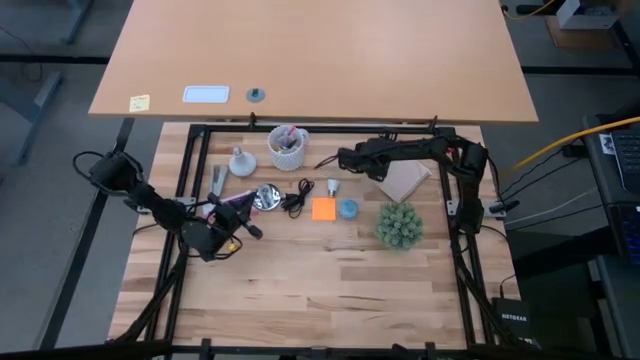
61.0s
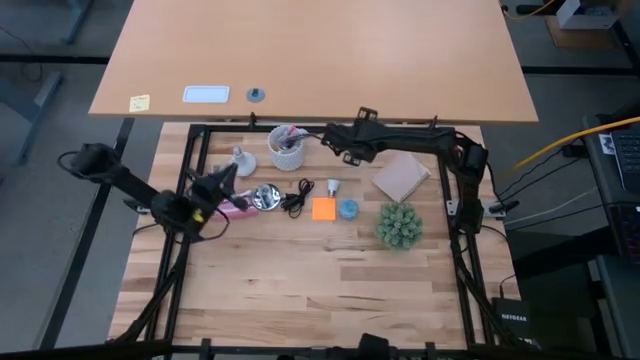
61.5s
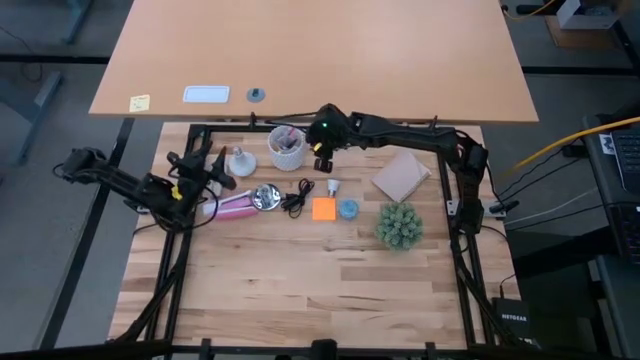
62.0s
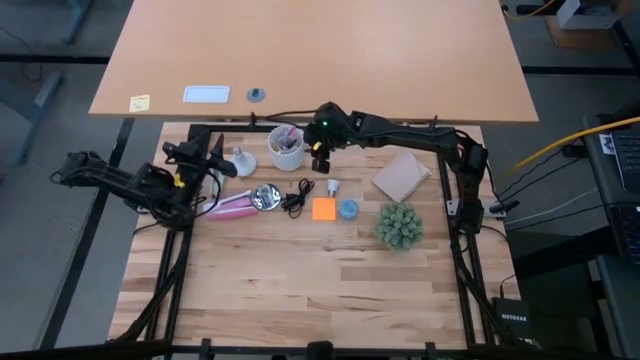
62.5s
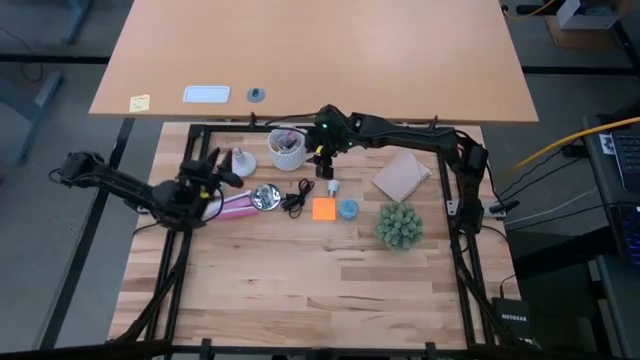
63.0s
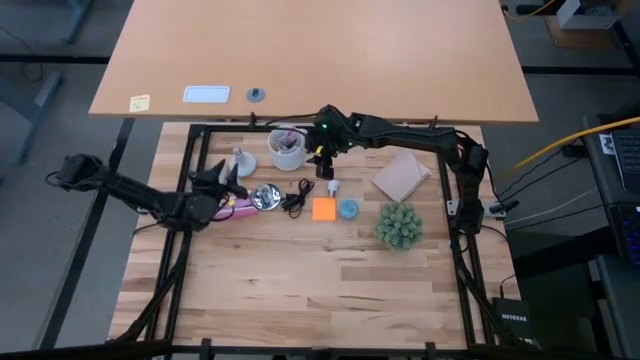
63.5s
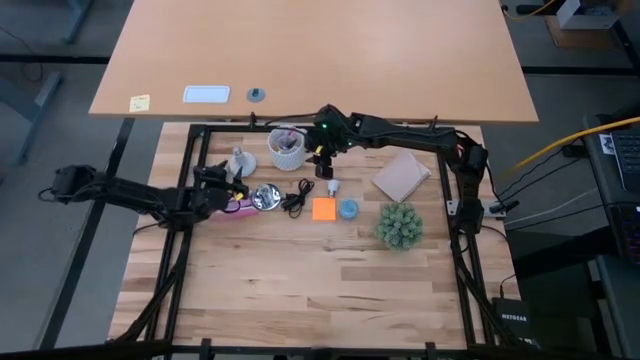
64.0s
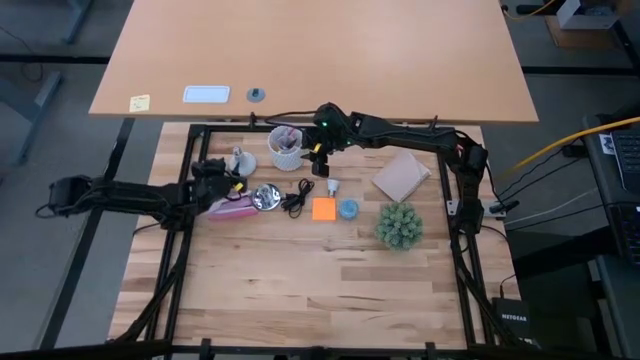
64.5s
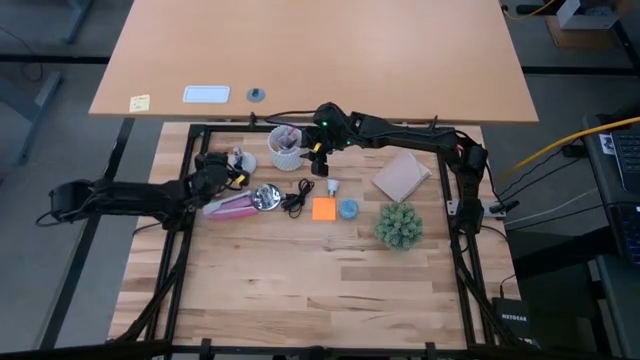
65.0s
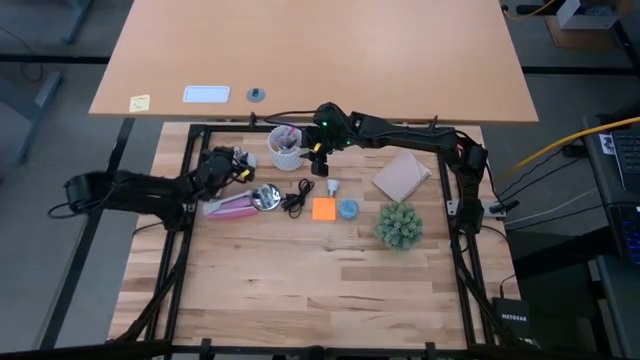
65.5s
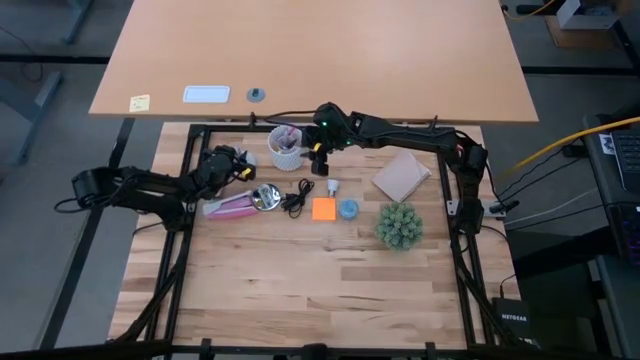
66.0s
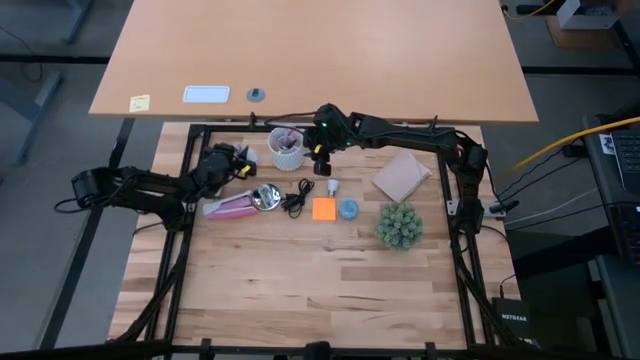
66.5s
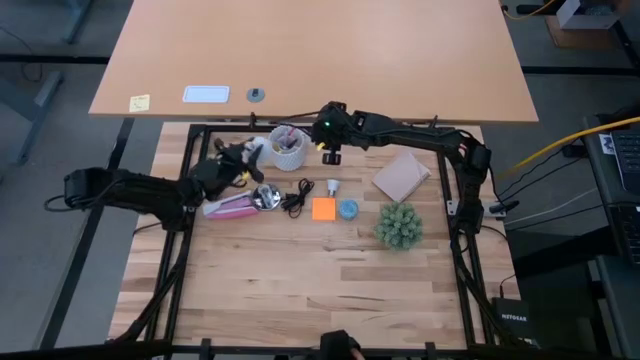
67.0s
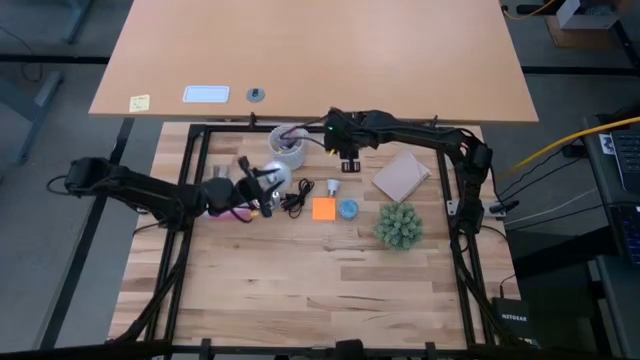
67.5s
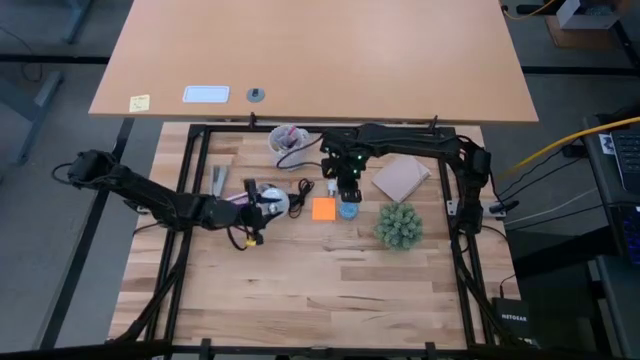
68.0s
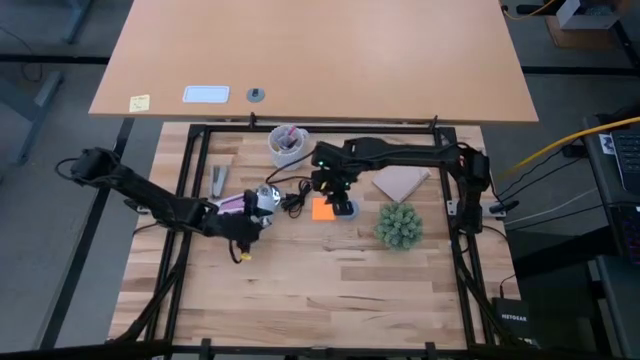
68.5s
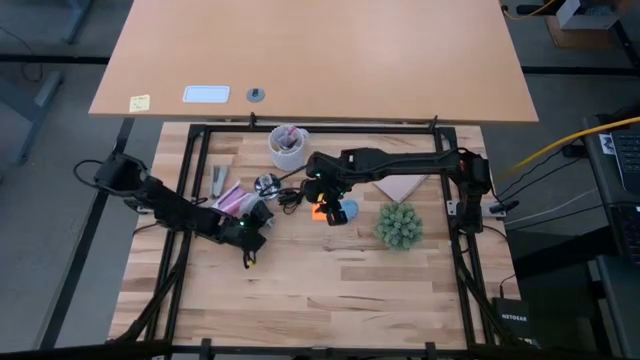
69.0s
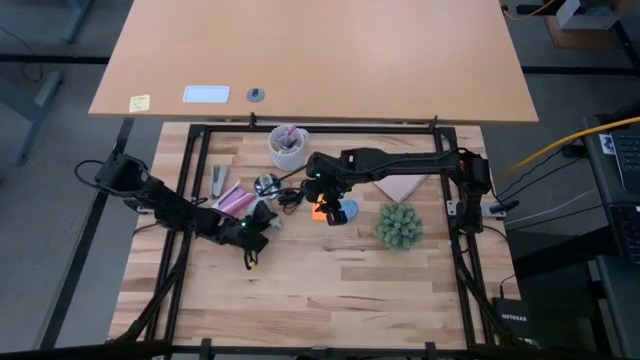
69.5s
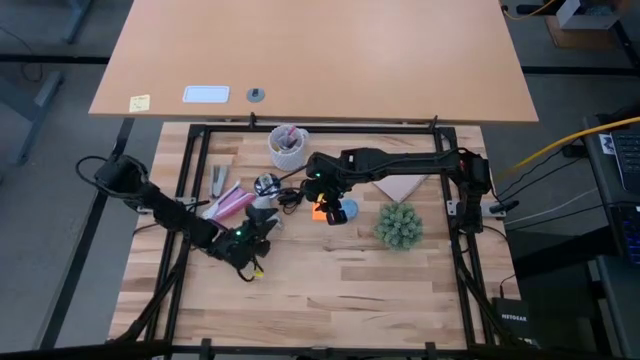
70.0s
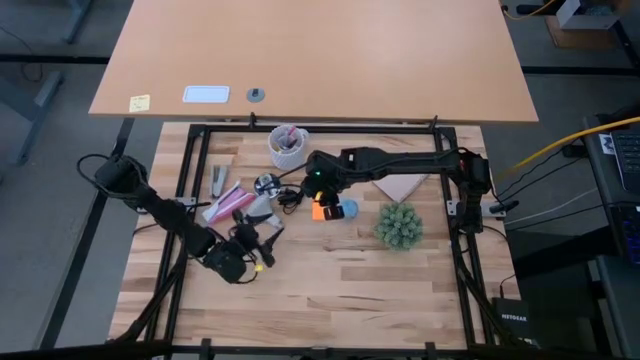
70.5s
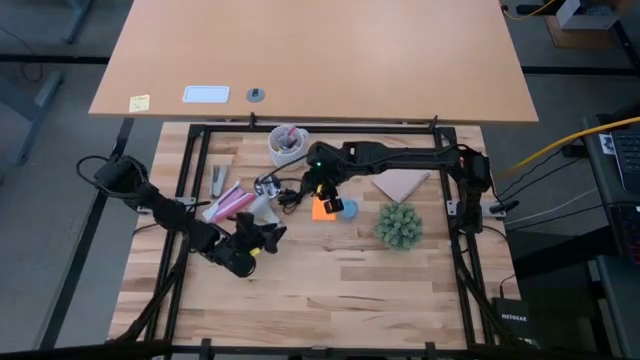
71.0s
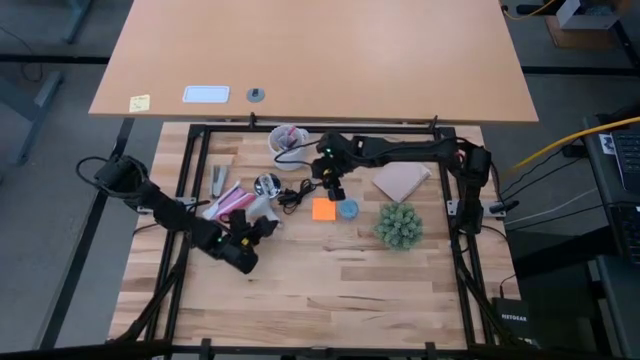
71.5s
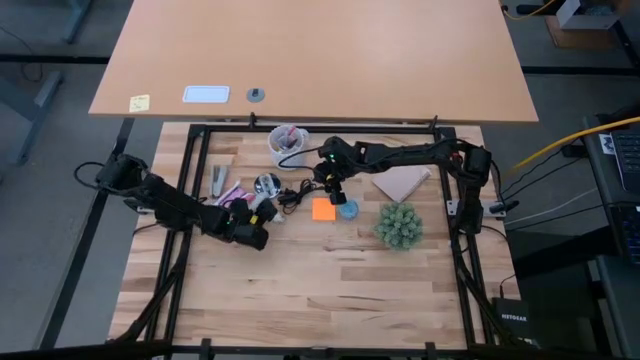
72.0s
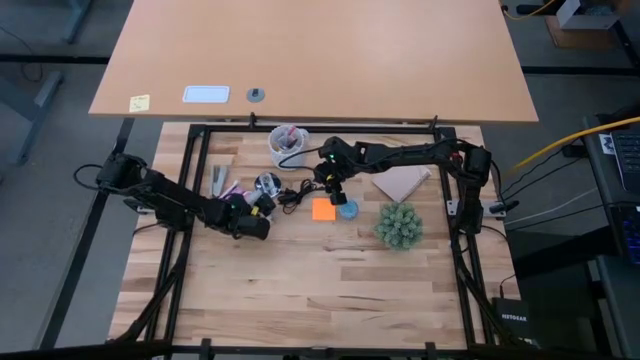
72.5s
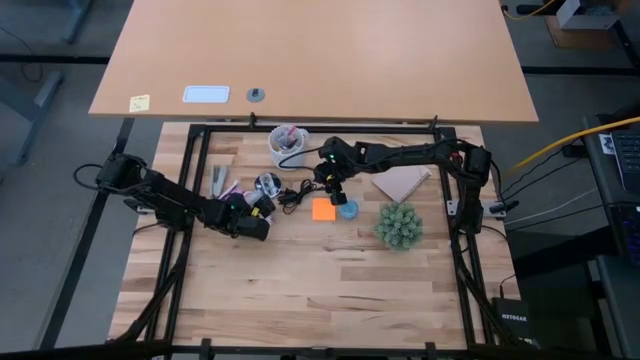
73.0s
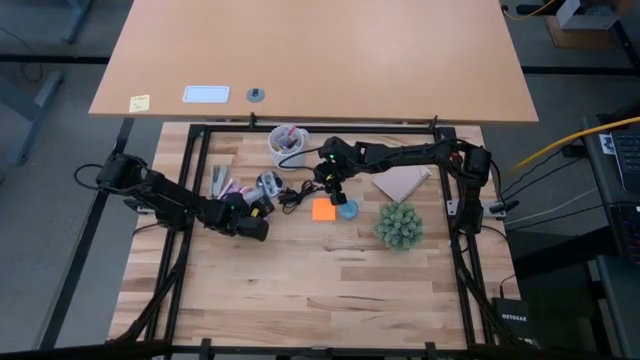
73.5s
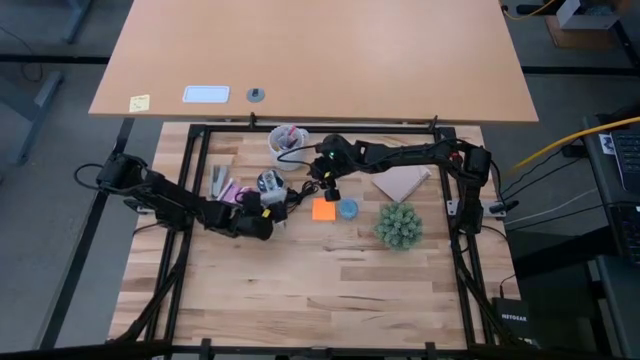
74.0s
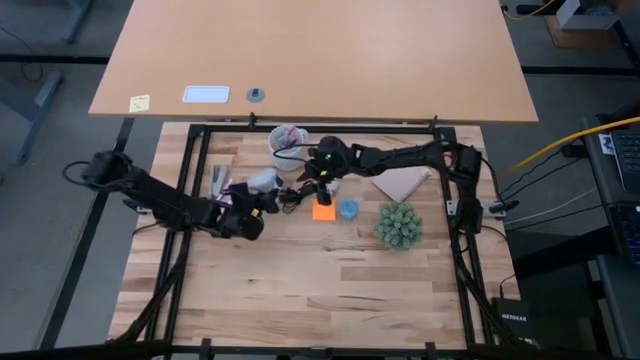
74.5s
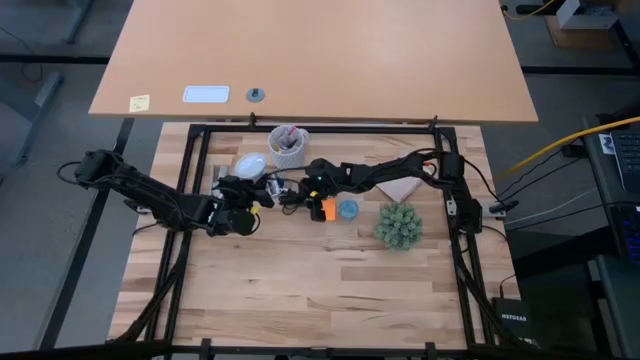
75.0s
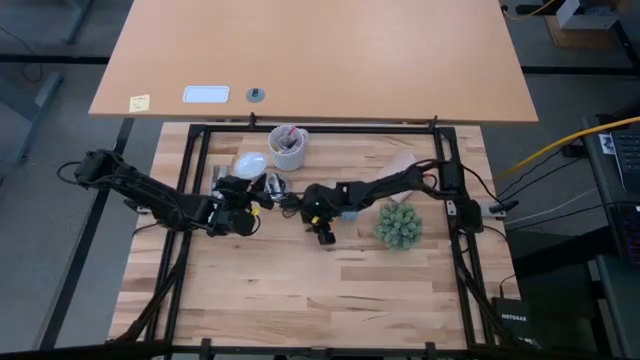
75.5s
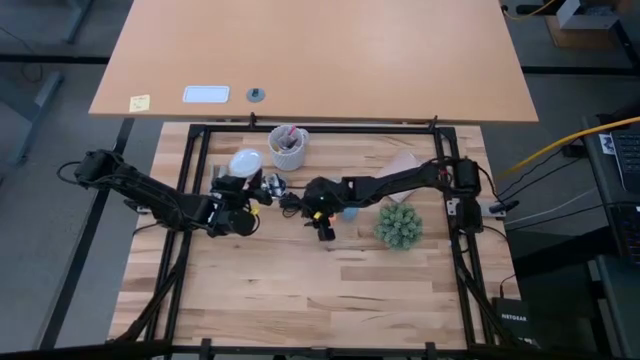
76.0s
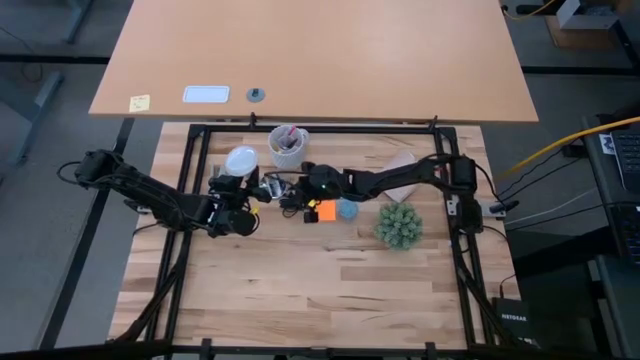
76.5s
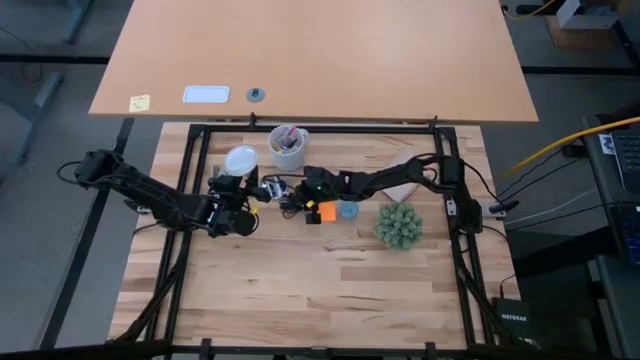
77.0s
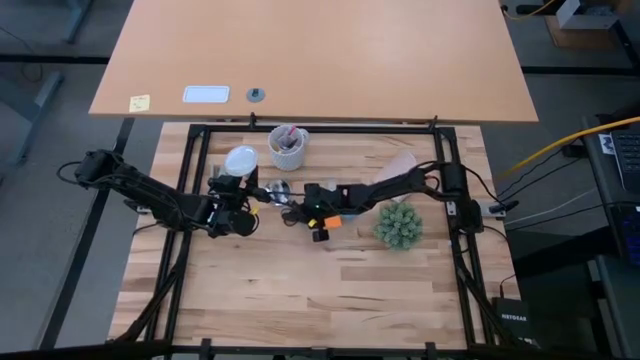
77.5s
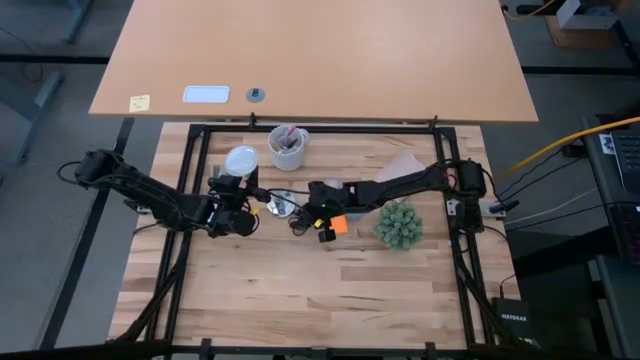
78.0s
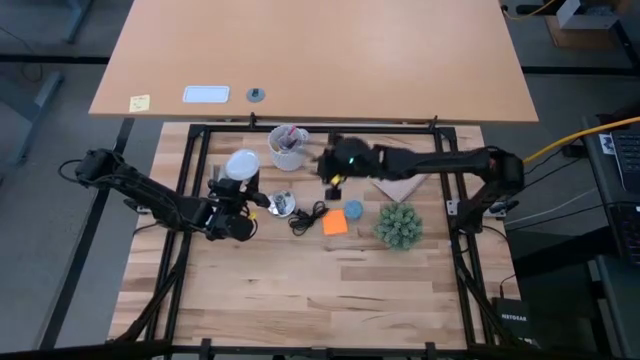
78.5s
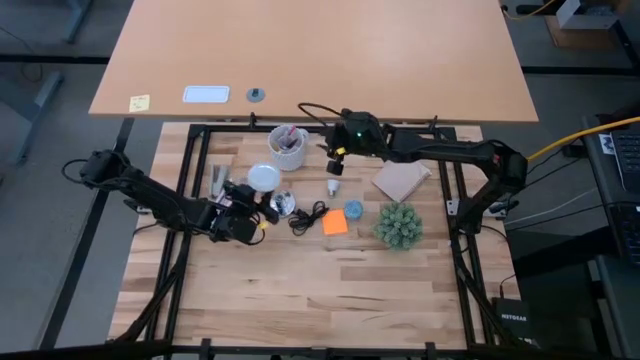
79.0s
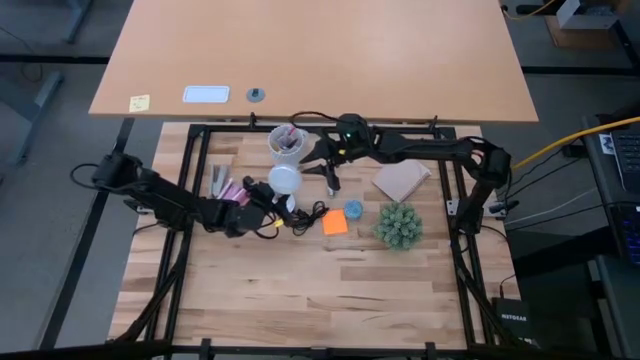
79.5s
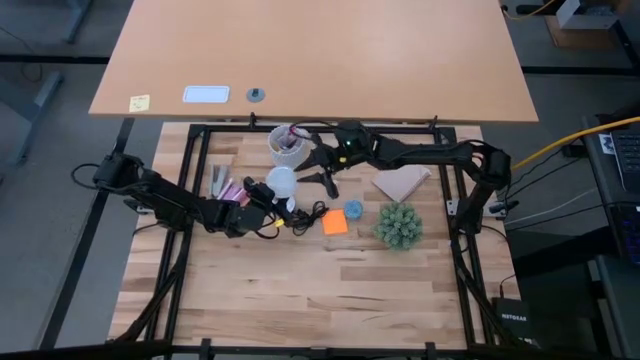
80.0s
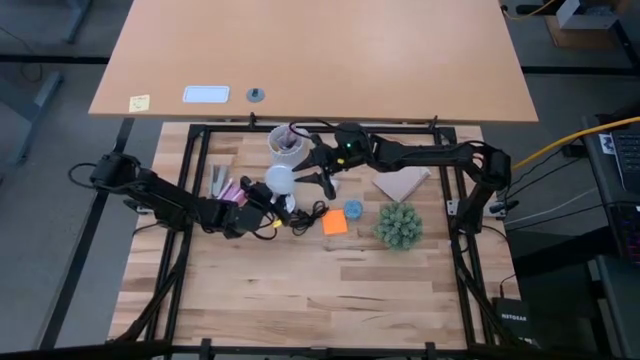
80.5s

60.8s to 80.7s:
Task: Screw lightbulb
Insert the lightbulb into the silver lamp

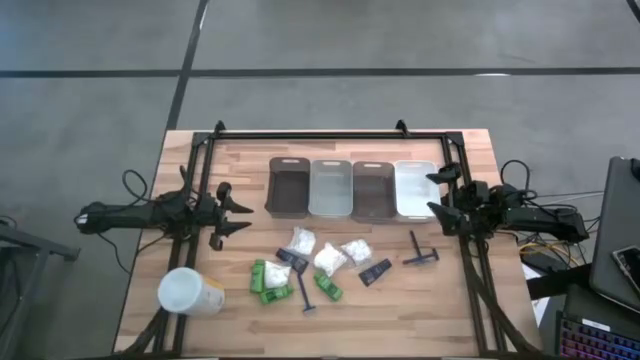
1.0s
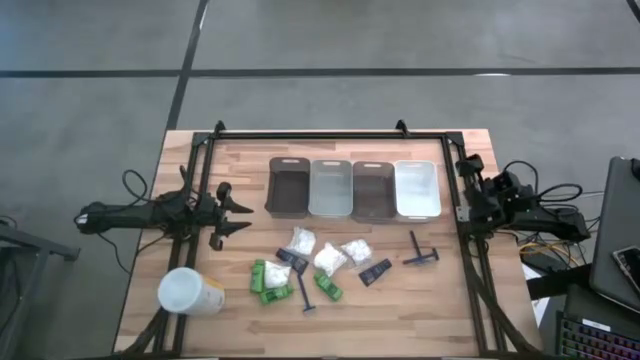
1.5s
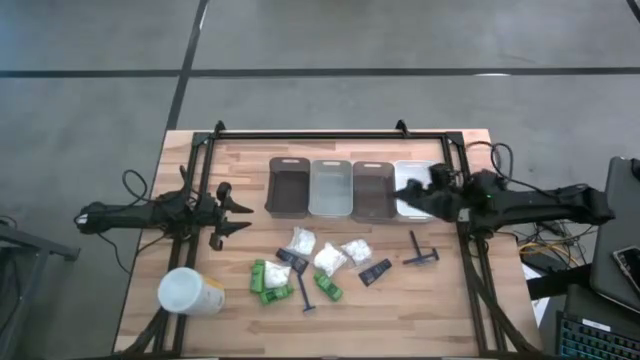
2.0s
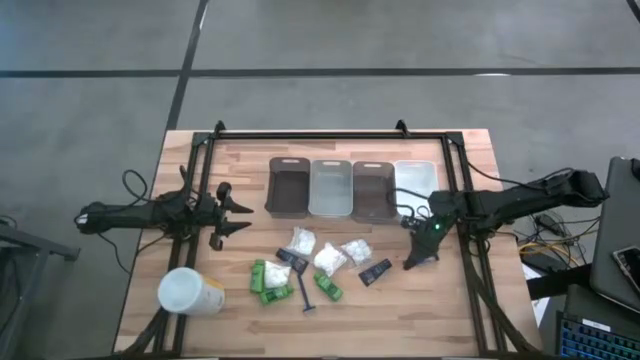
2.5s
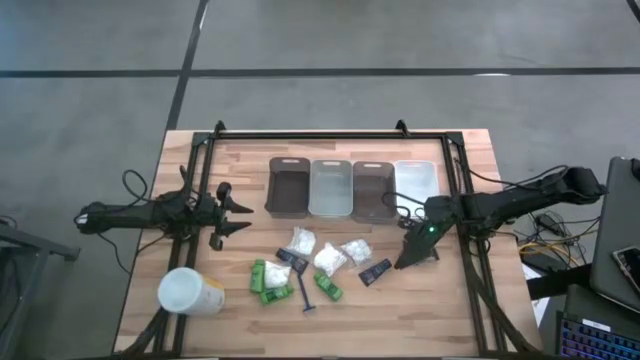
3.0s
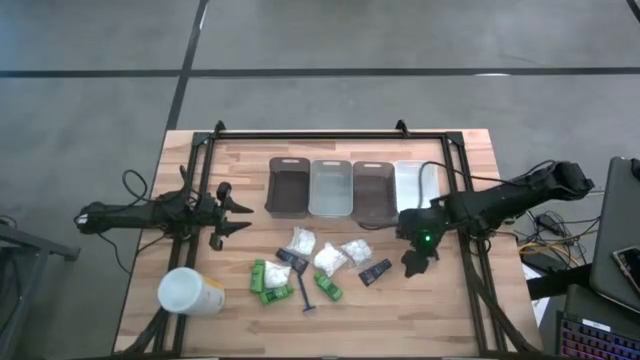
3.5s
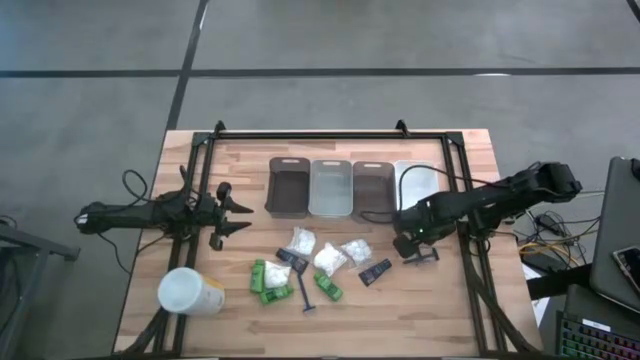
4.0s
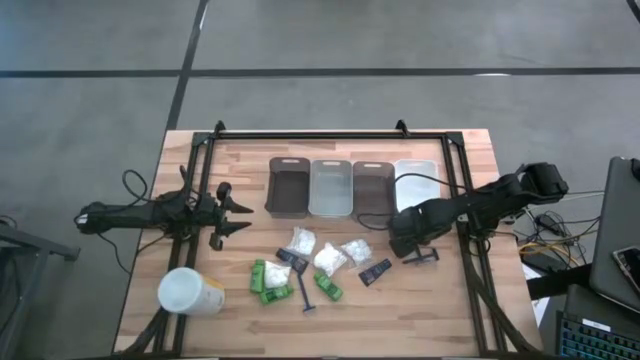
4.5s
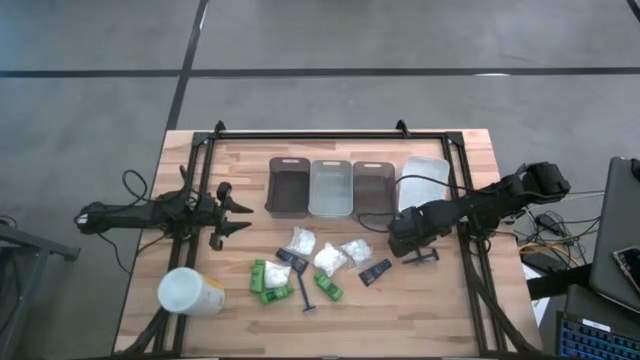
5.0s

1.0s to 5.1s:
Task: Pick & Place Travel size toiletries
Put the top right blue razor into the white bin
